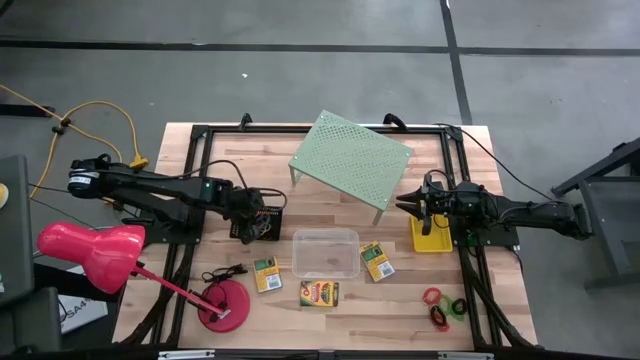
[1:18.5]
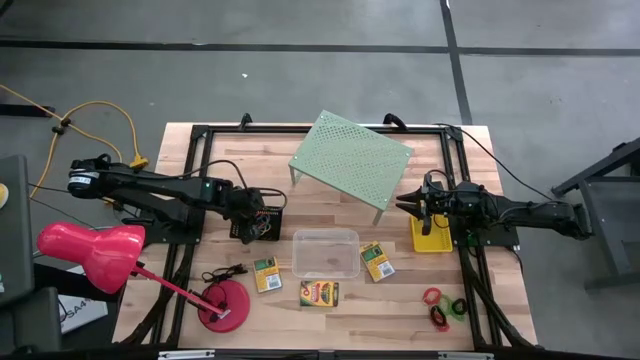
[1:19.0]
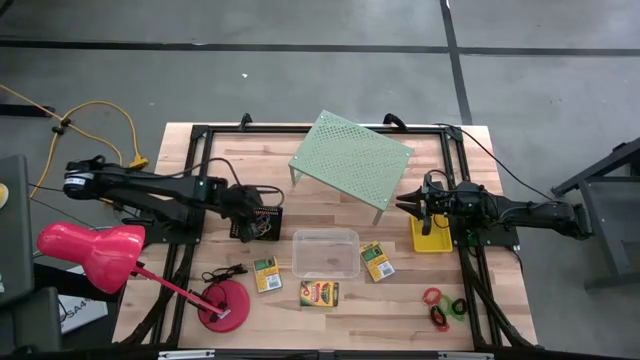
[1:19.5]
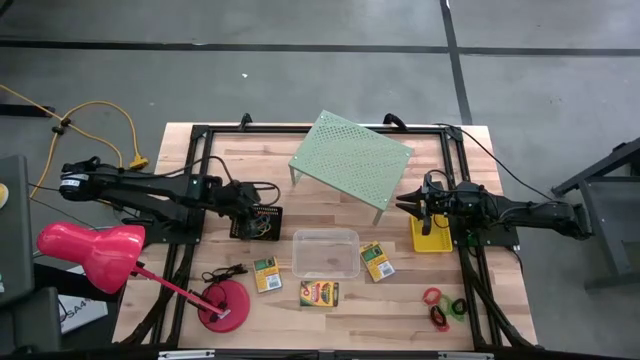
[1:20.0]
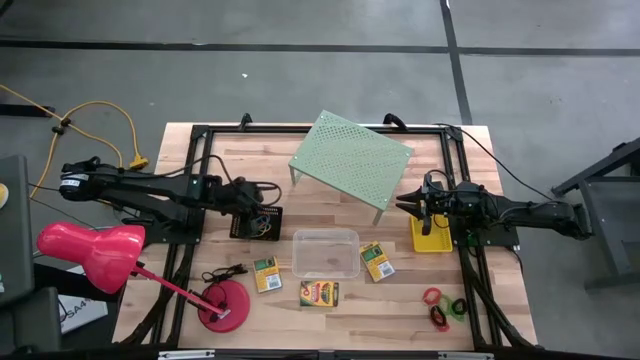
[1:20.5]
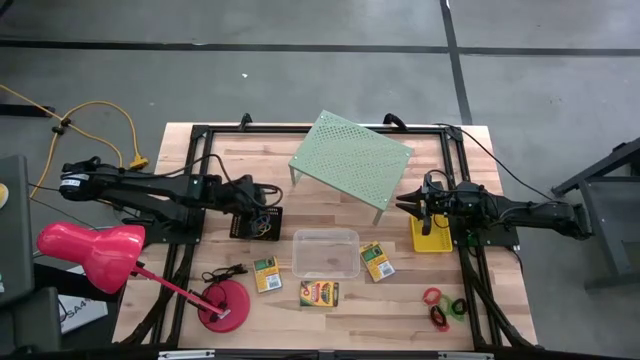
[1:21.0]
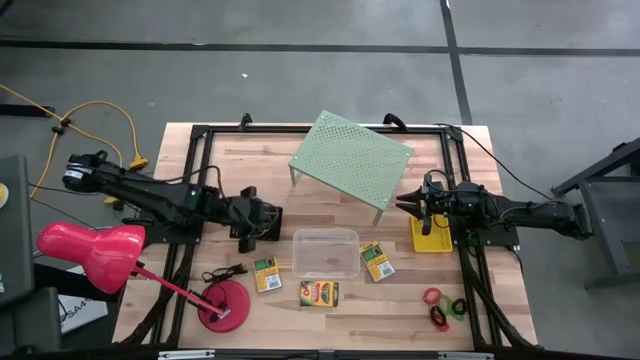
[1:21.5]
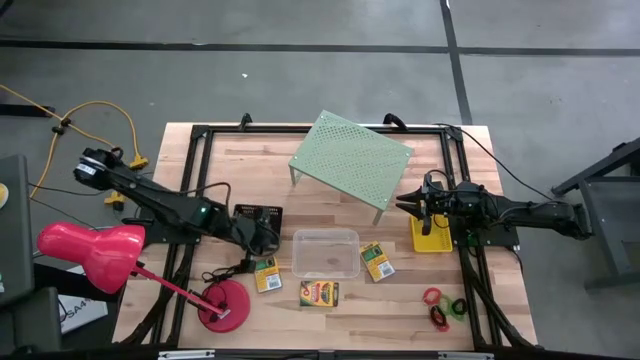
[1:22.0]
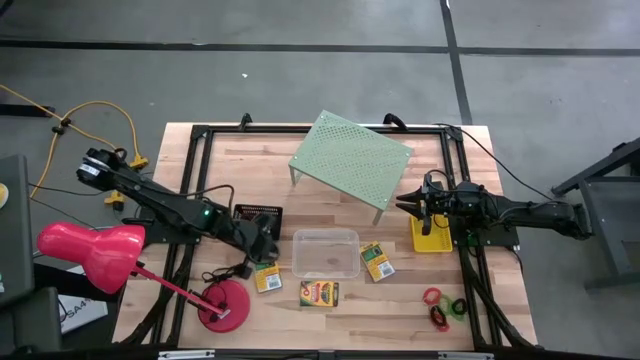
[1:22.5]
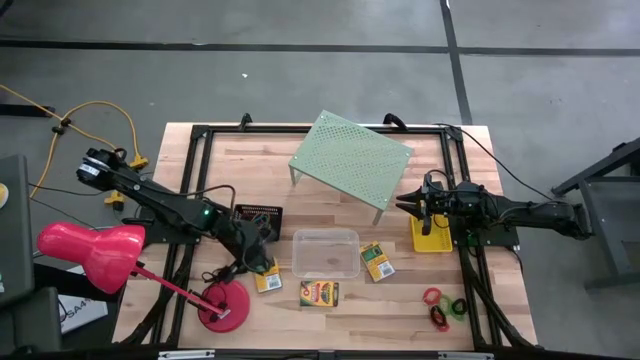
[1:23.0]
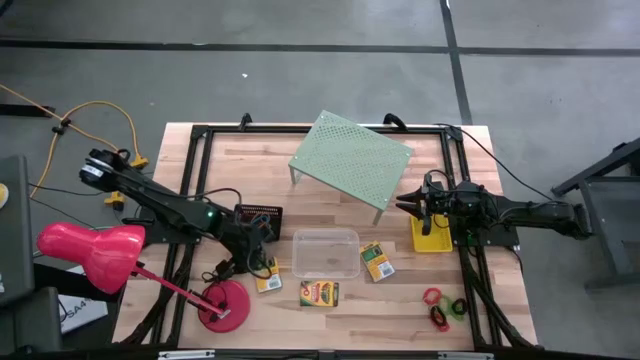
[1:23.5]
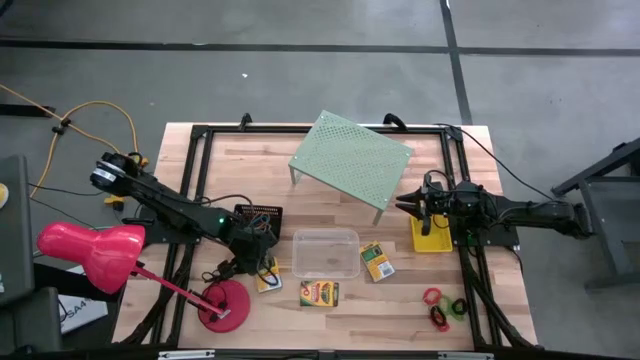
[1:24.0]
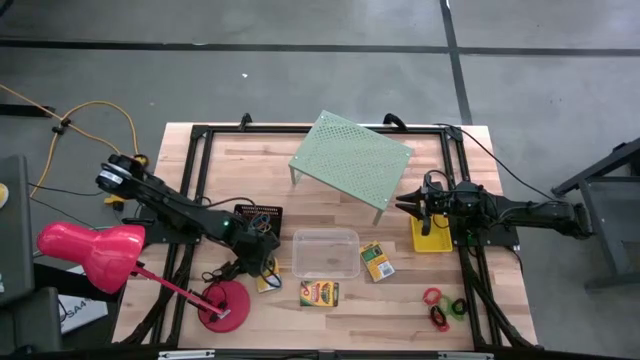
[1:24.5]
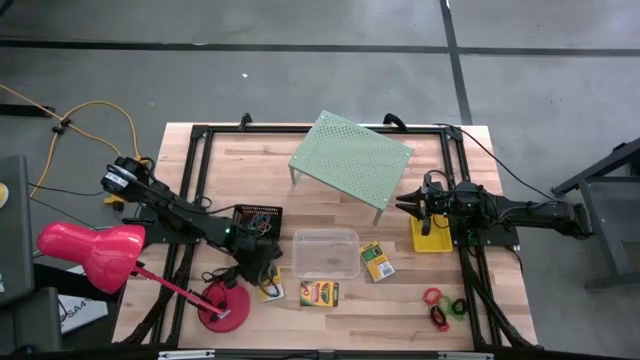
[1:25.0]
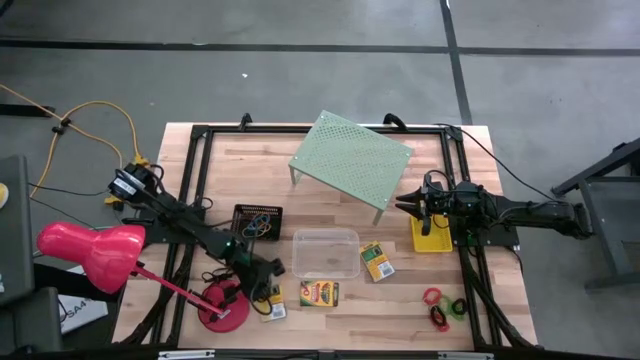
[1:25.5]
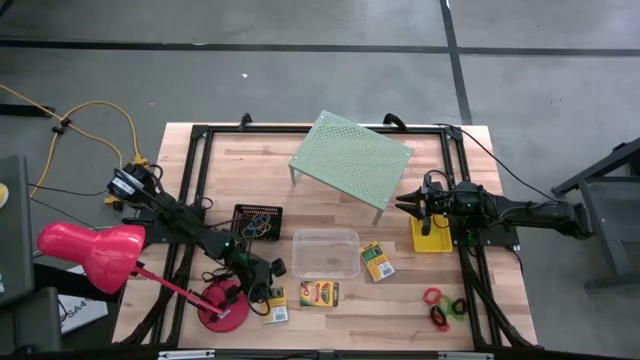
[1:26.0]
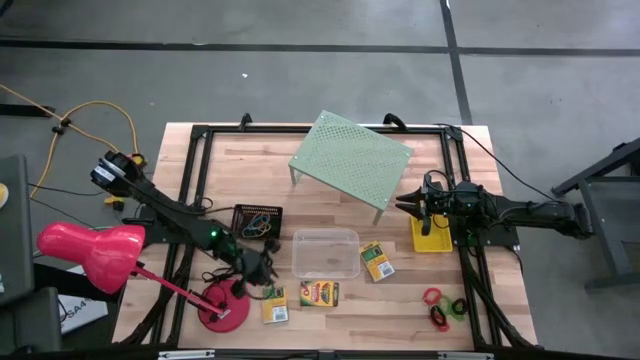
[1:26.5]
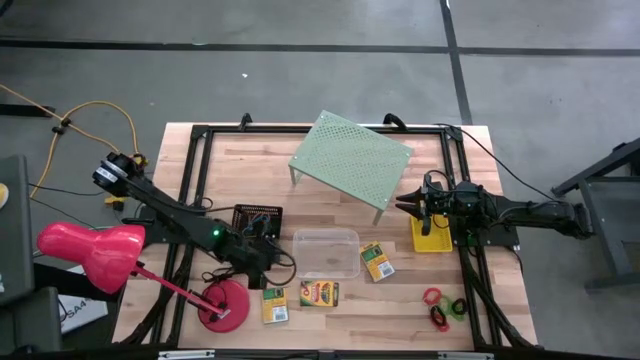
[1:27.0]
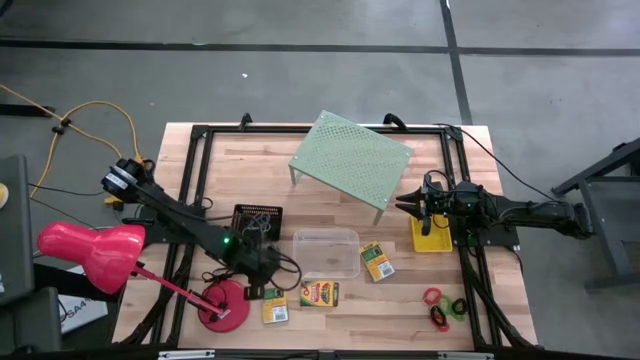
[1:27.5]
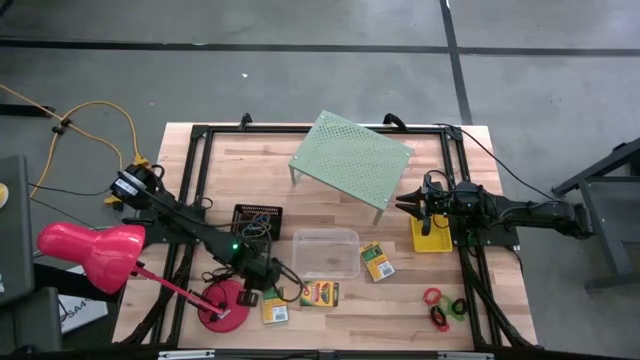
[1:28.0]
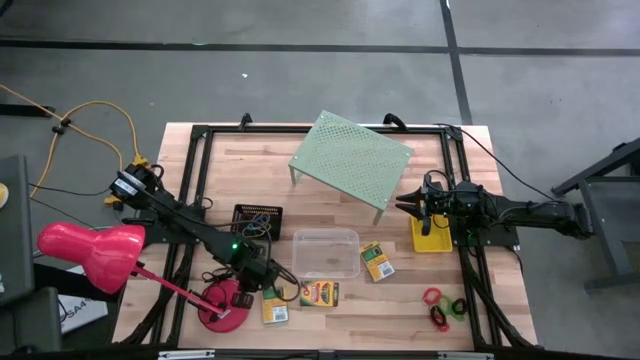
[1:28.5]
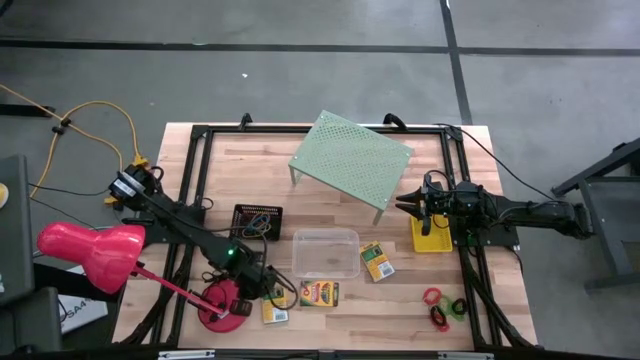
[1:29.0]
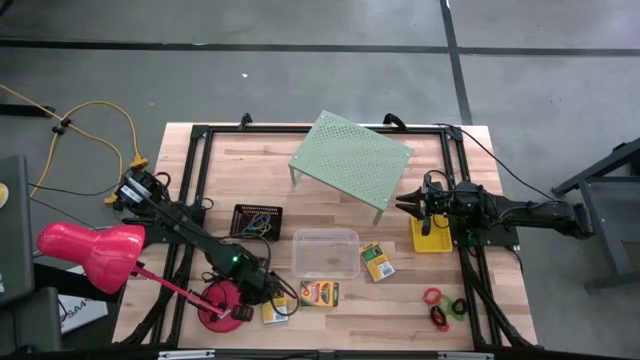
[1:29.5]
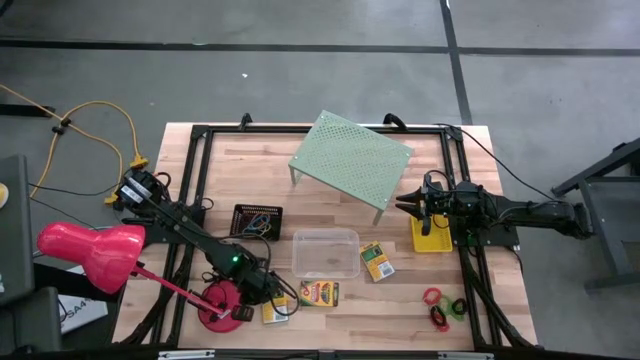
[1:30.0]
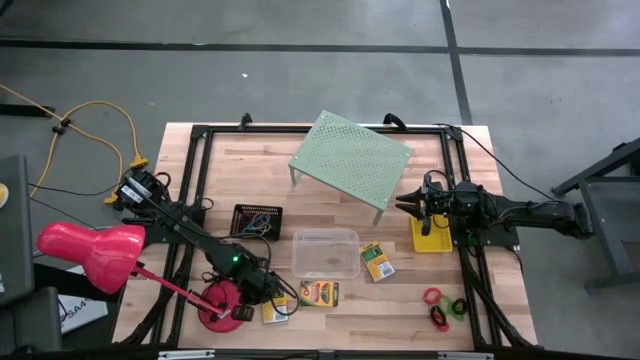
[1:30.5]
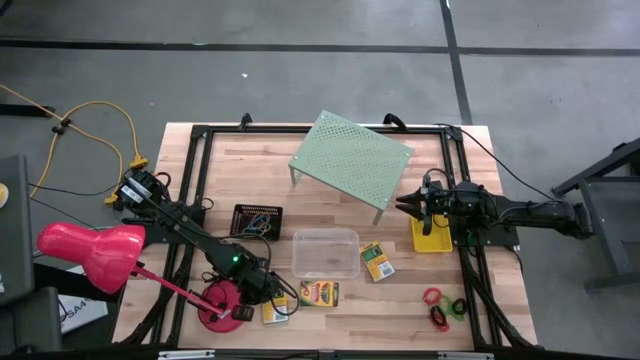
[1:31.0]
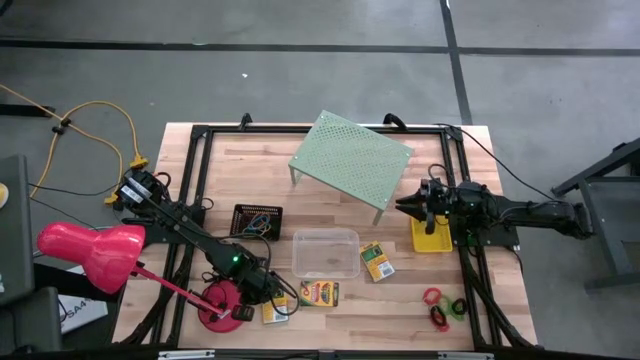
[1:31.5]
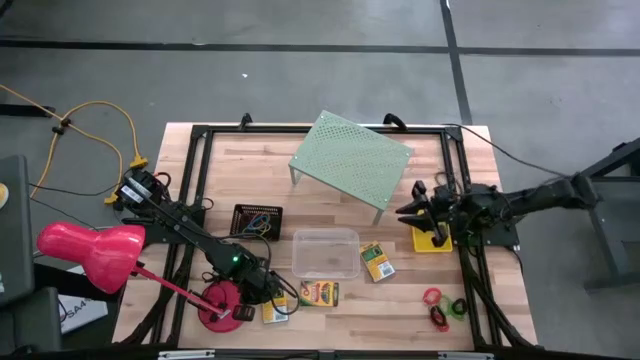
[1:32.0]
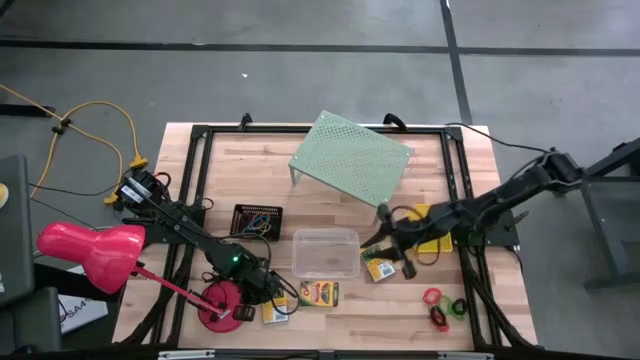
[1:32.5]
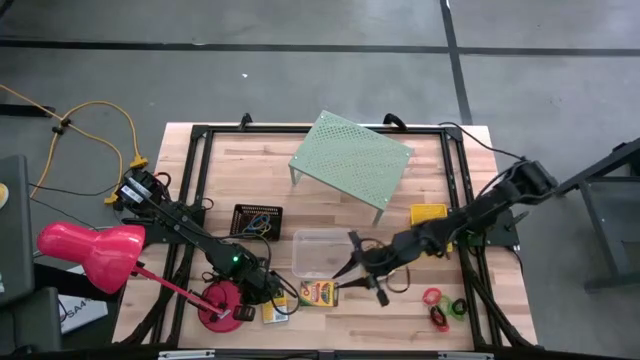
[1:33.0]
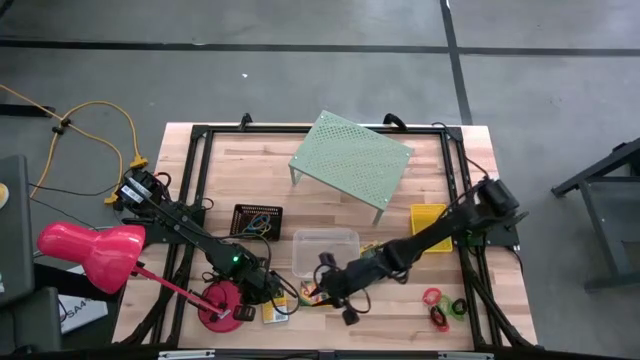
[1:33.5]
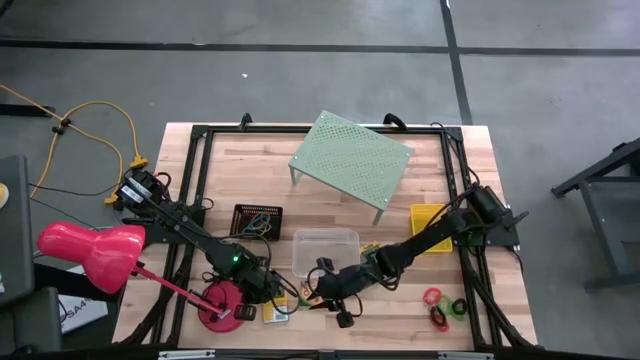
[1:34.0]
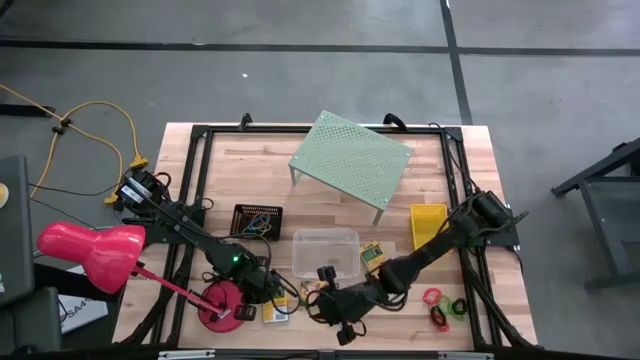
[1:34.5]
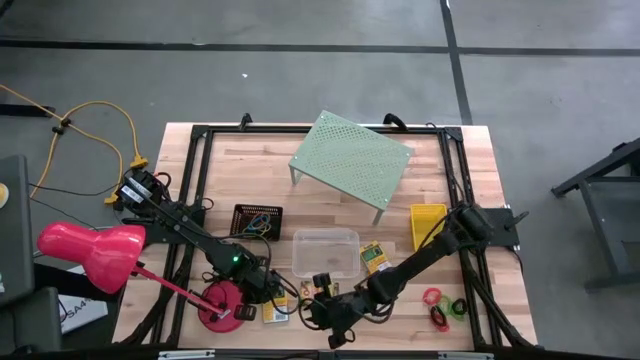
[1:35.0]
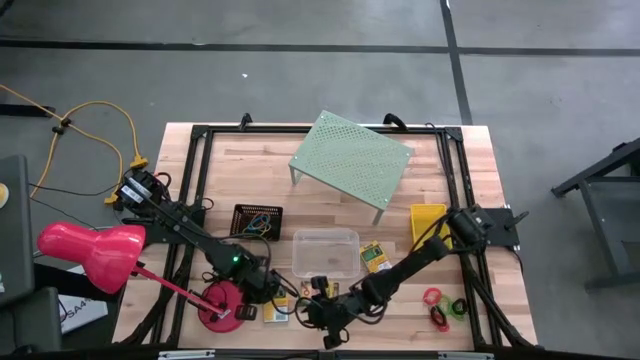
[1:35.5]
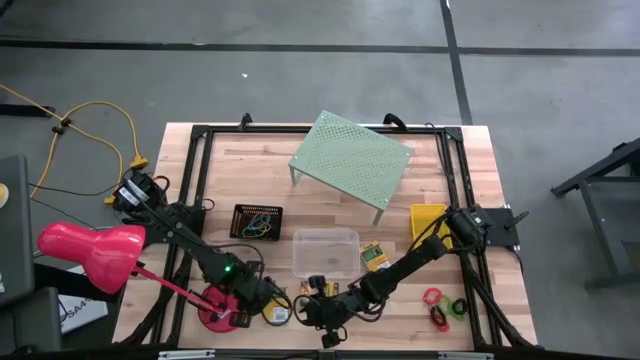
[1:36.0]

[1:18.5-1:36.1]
Task: Pick & Place Office Desk Supplies
Put the left yellow crayon box into the transparent bin

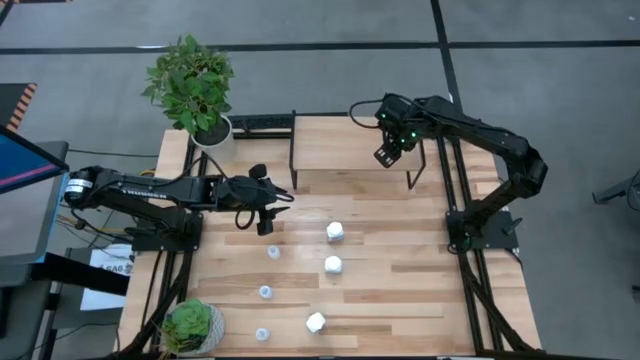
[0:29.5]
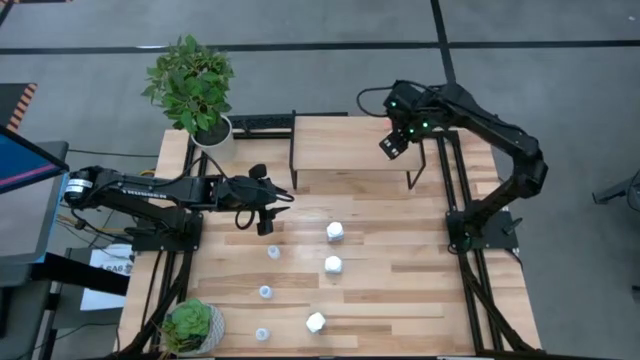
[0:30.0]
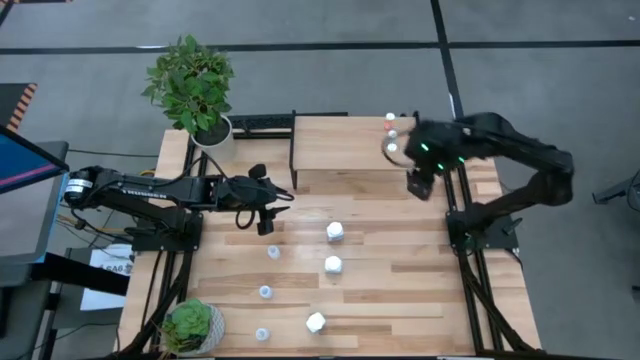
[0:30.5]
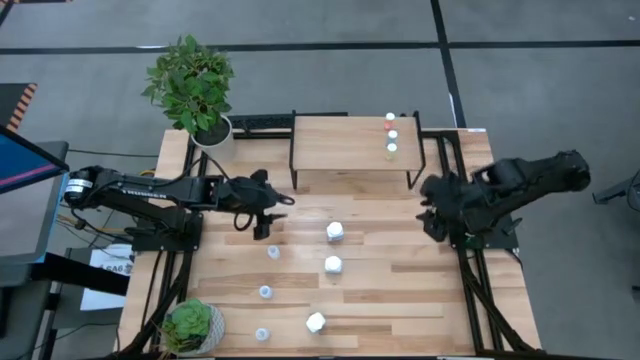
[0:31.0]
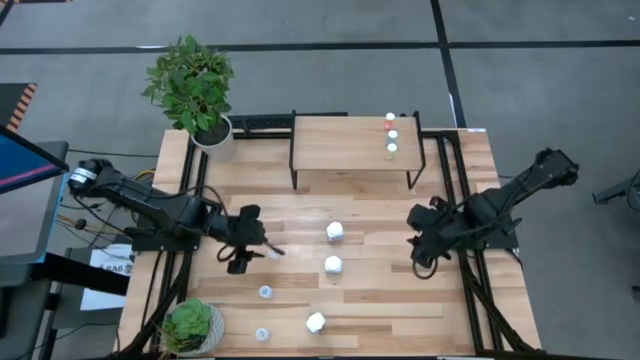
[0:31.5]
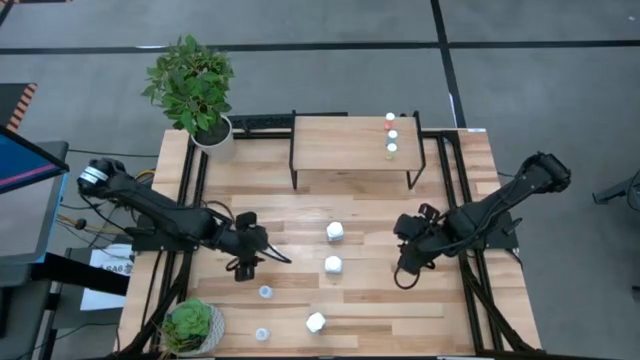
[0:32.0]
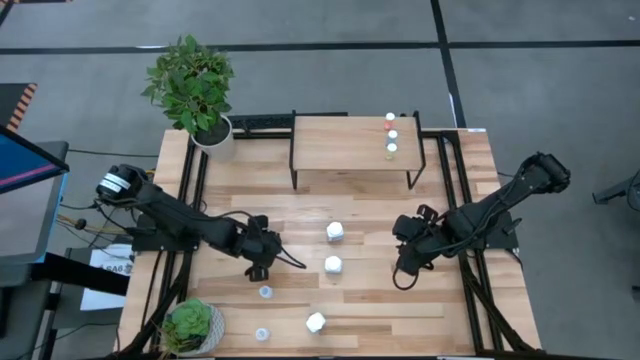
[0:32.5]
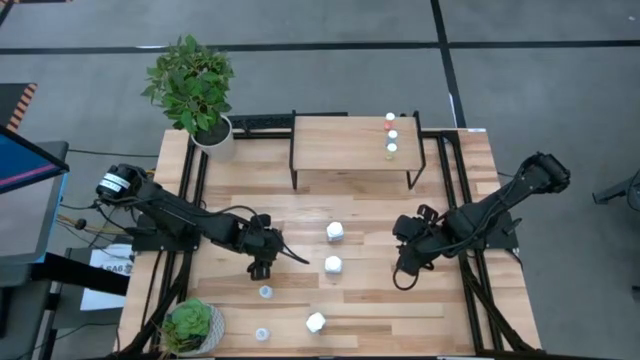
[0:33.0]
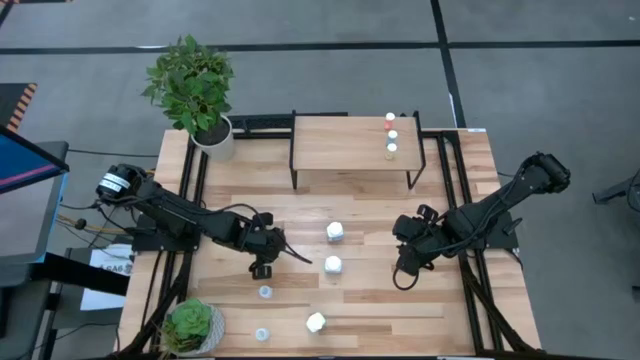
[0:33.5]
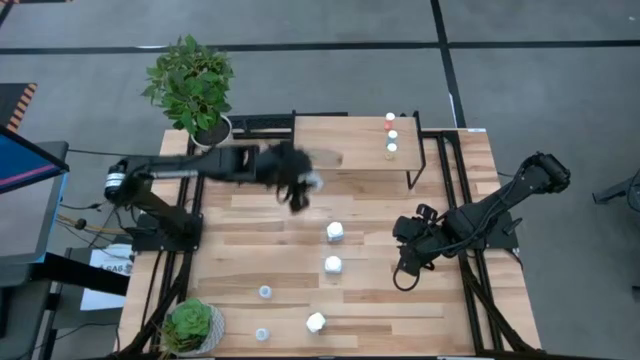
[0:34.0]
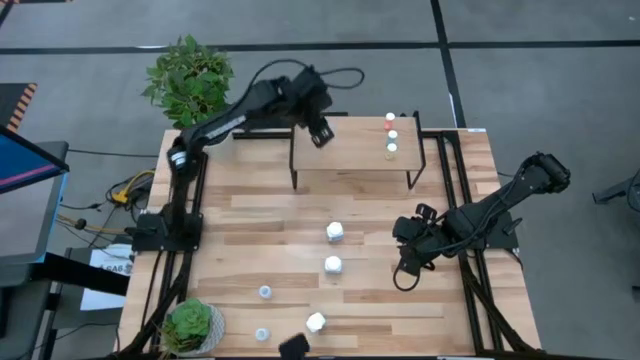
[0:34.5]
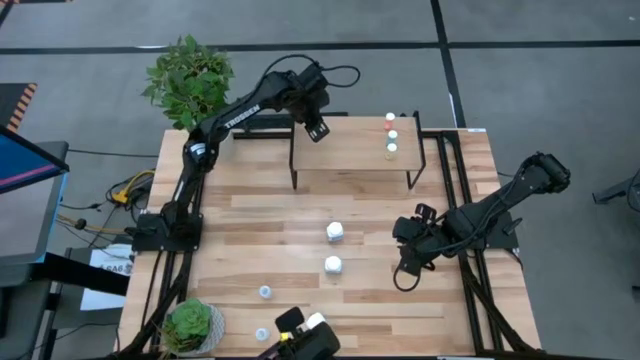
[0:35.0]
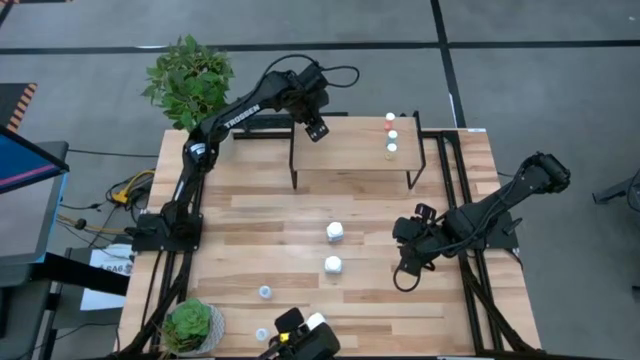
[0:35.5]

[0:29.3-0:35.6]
Task: Pick and place medicine bottles onto shelf by color
Put the top transparent pill bottle on the shelf
